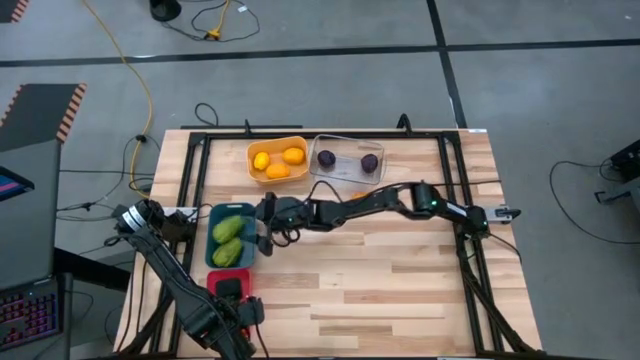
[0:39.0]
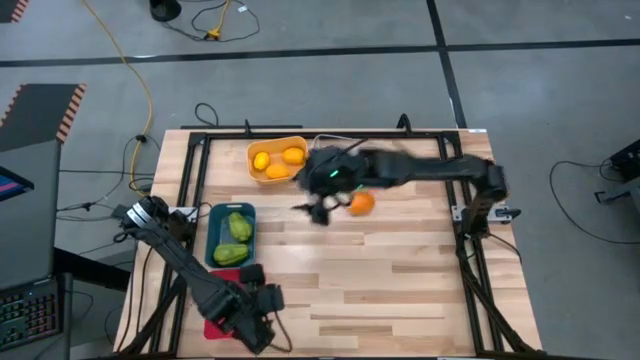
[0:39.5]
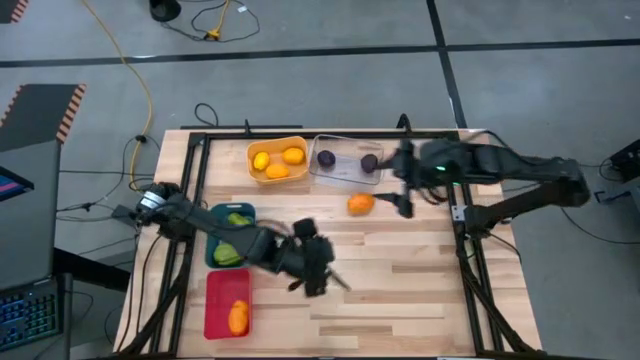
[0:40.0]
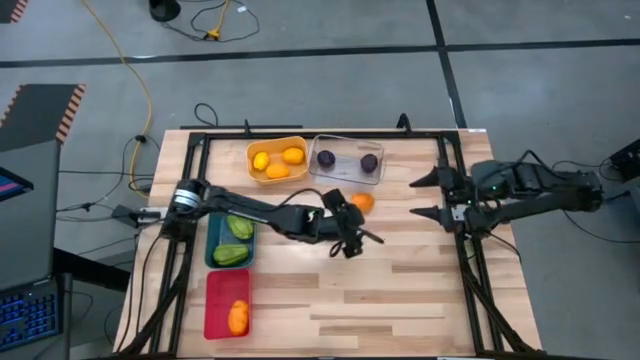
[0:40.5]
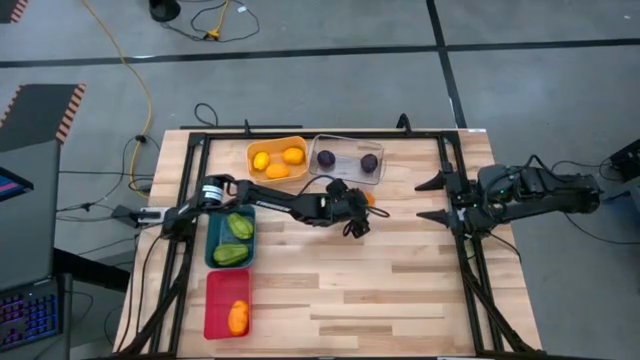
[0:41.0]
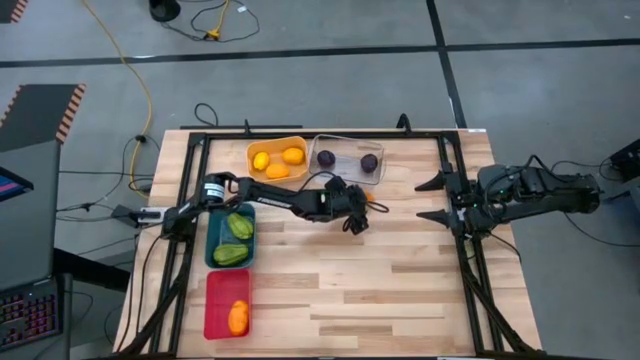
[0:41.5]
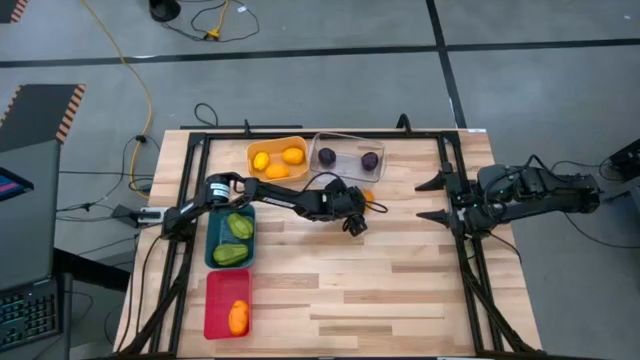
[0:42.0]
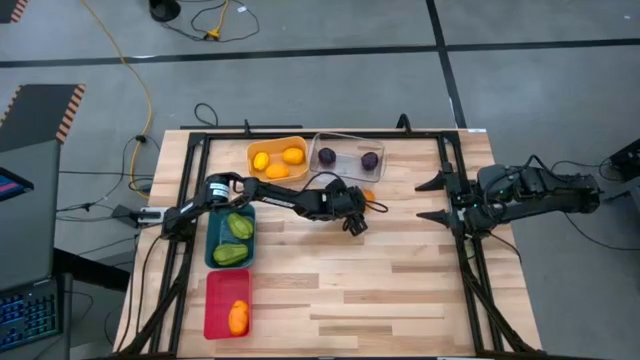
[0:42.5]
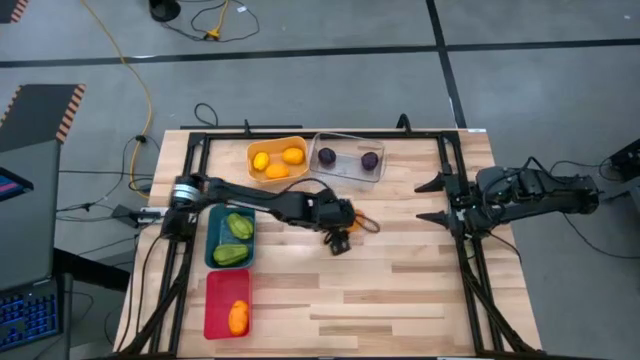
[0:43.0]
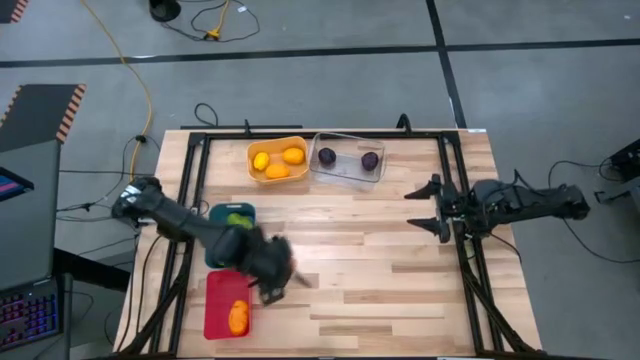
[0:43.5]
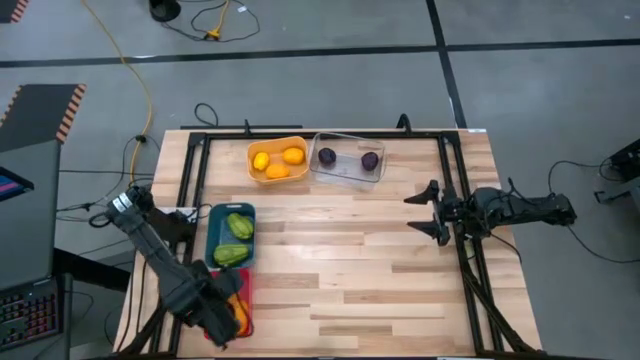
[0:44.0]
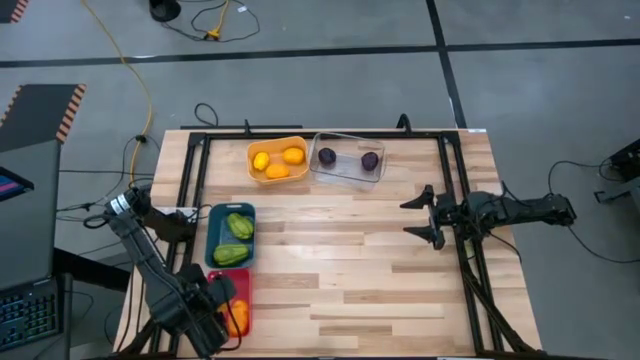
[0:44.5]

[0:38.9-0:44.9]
Task: Sort produce into baskets
Put the orange potato into the red bin

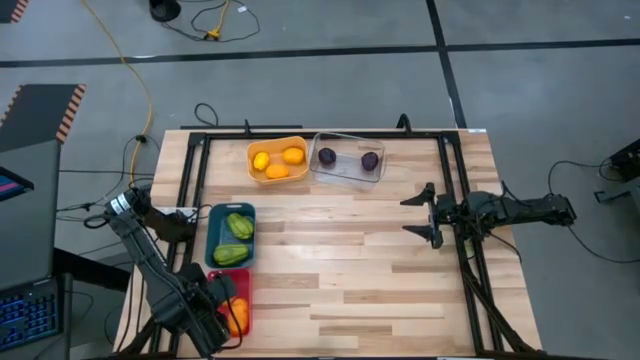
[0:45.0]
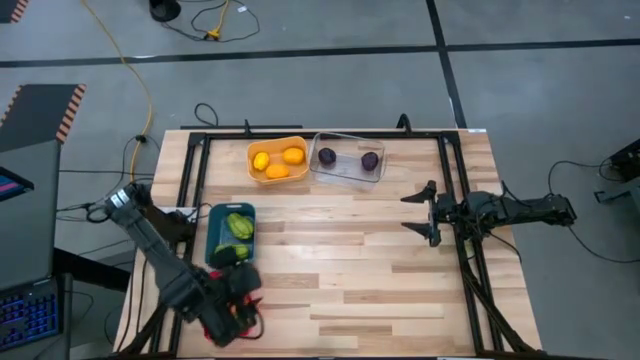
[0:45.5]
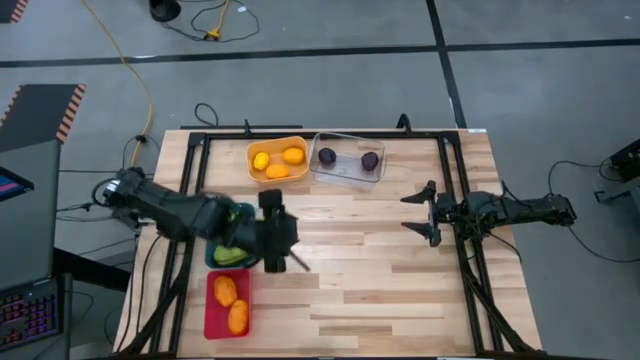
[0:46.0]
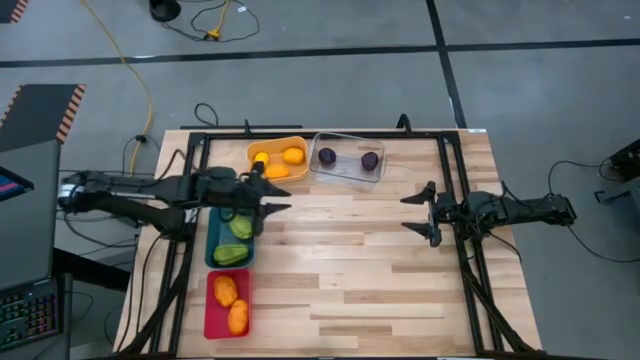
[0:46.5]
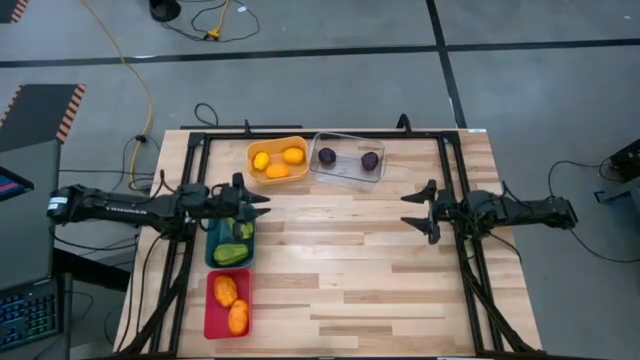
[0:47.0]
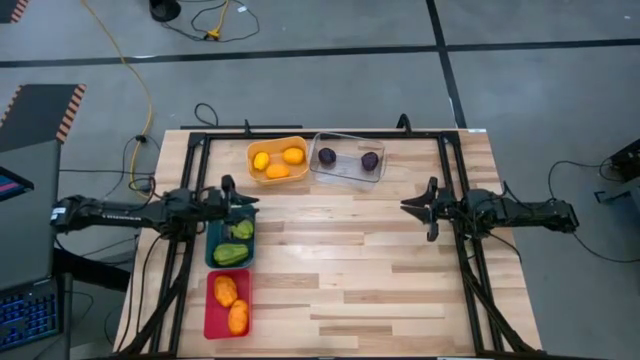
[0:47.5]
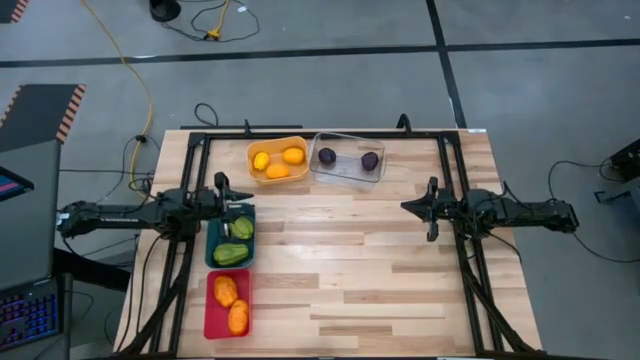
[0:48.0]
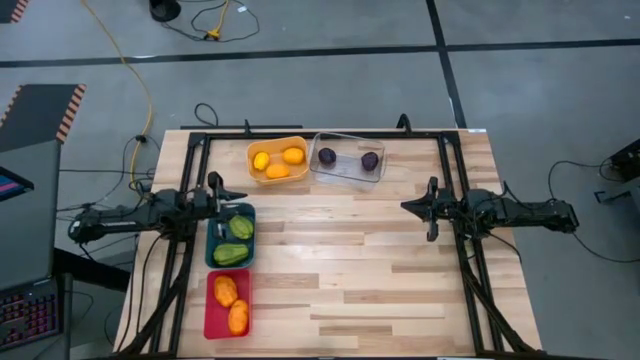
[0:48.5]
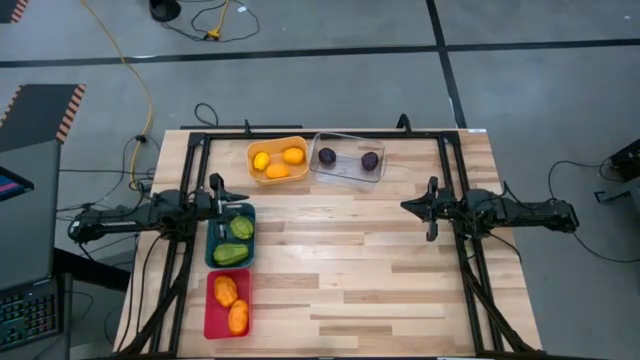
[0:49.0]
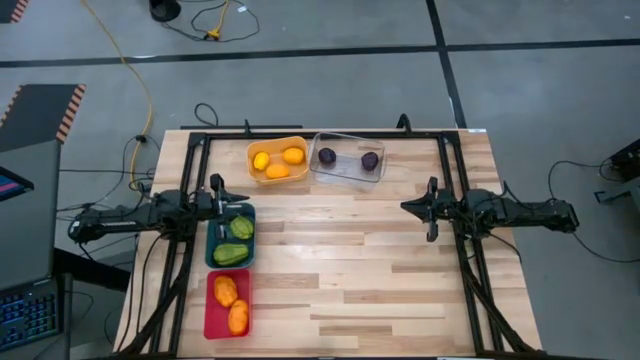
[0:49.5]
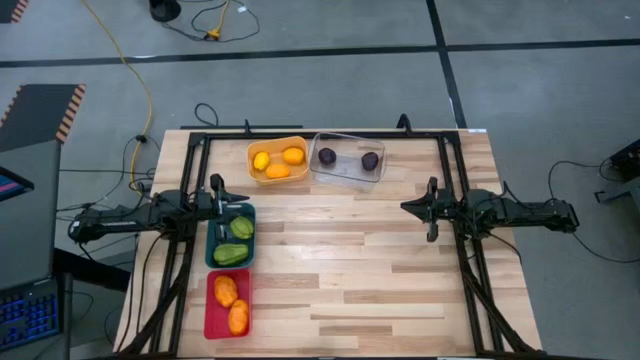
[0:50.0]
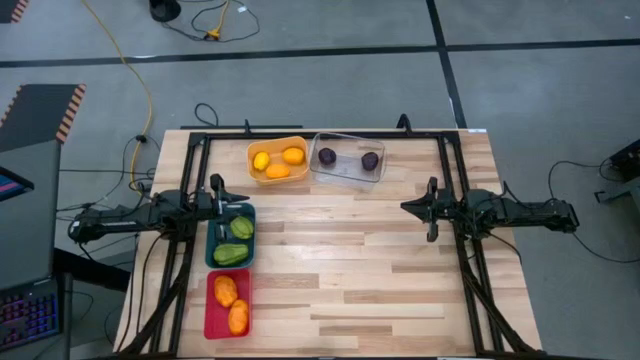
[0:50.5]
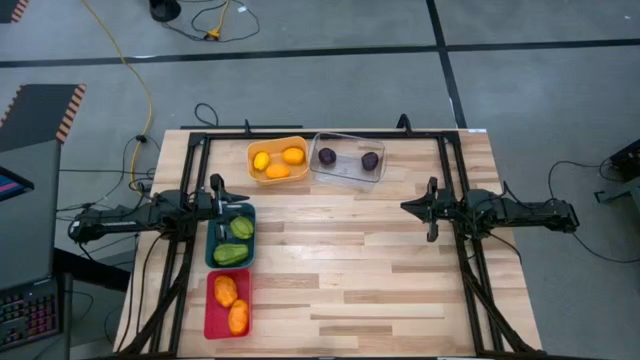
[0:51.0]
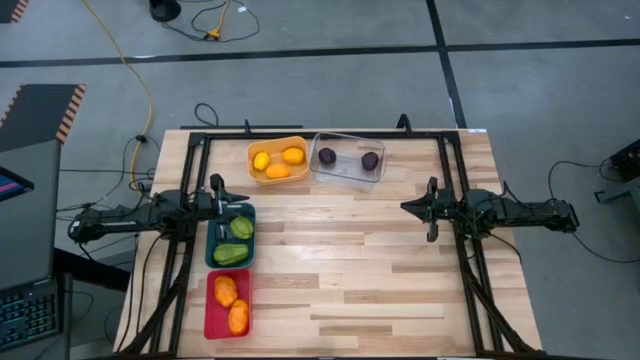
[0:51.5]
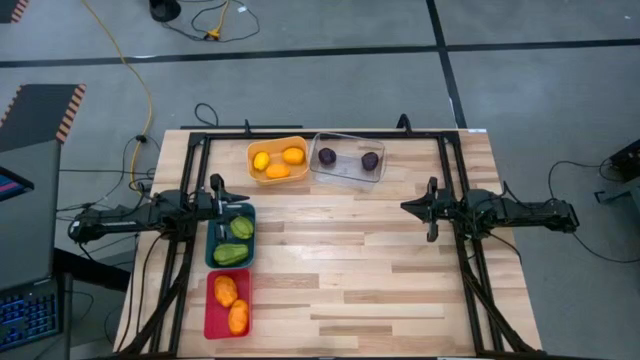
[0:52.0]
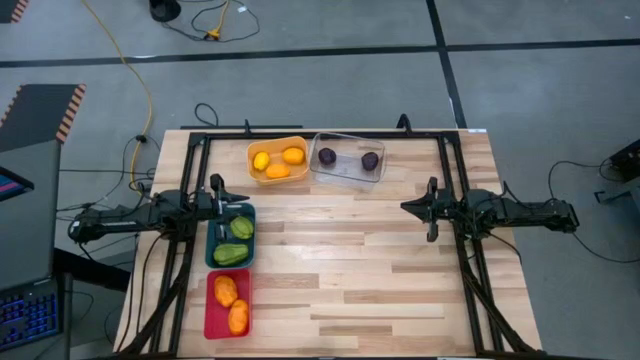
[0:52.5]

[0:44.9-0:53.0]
Return to Home Position

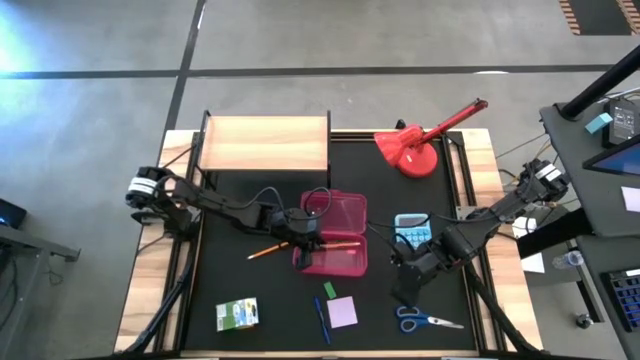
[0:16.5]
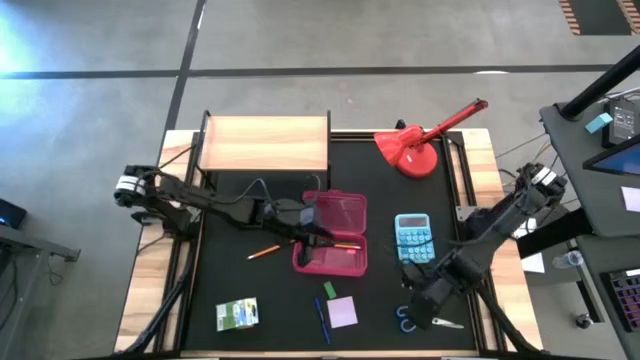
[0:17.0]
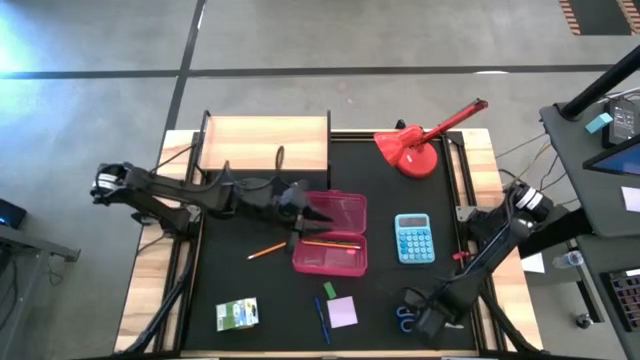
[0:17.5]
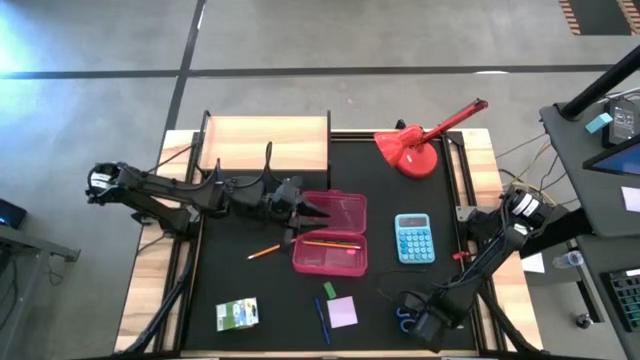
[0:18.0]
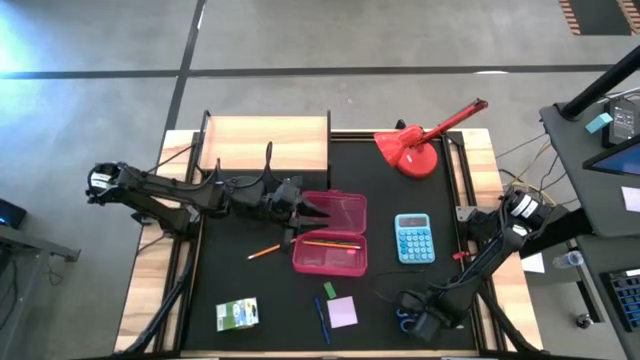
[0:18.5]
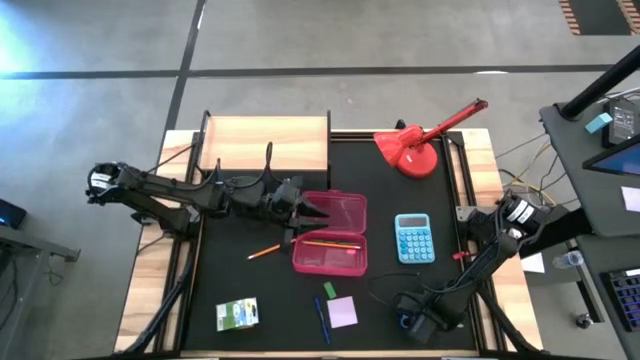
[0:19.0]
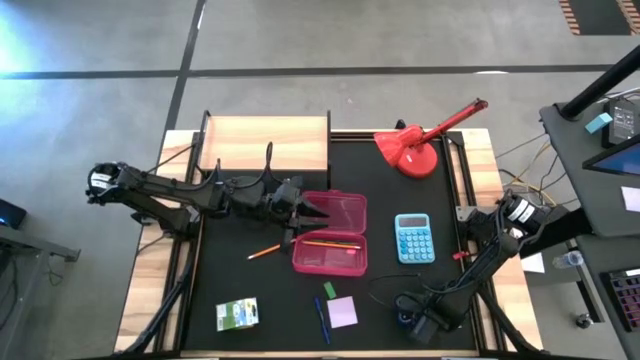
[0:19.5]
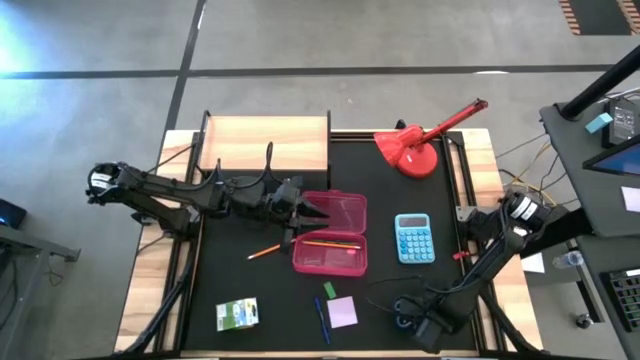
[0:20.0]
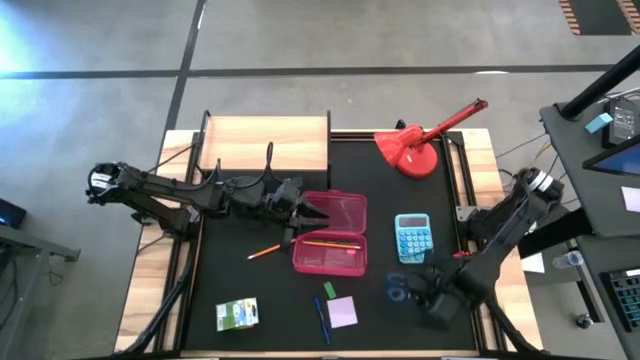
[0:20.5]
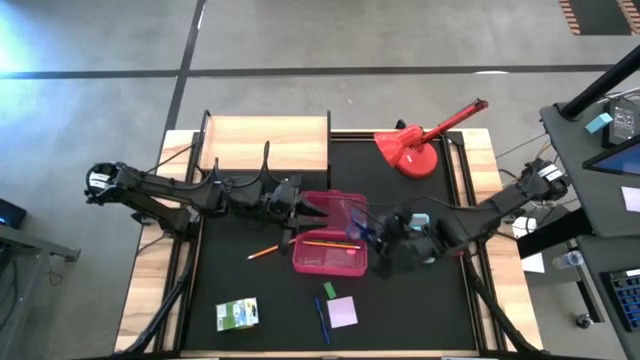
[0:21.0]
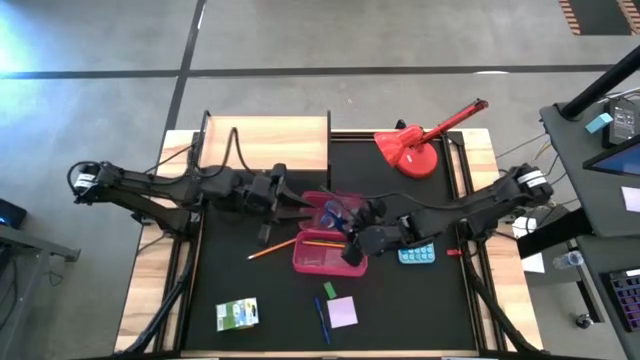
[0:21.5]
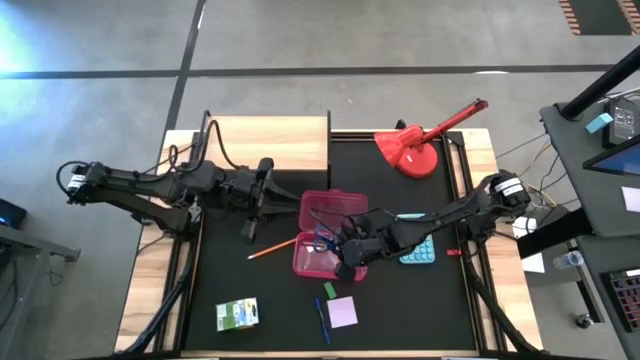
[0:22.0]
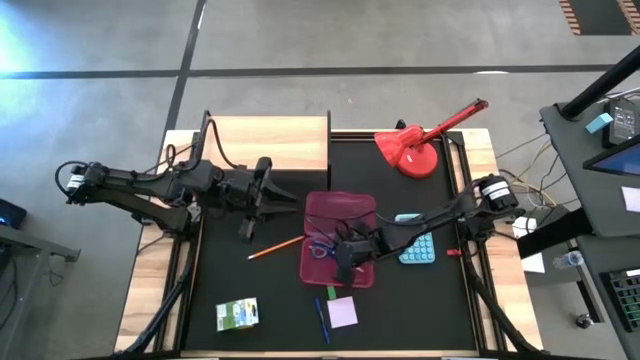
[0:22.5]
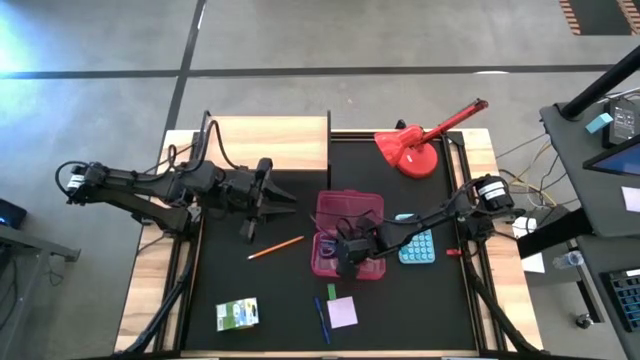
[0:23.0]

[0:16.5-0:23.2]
Task: Pack school essentials
Put the blue scissors into the pink supply box
